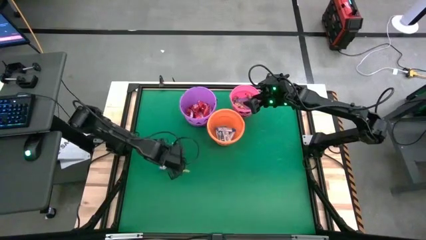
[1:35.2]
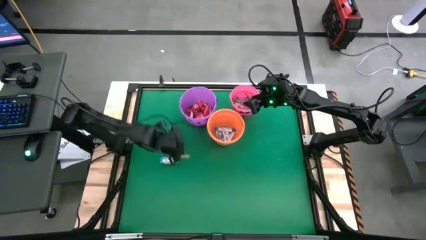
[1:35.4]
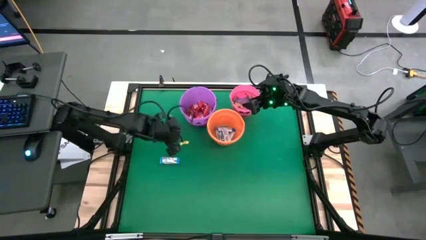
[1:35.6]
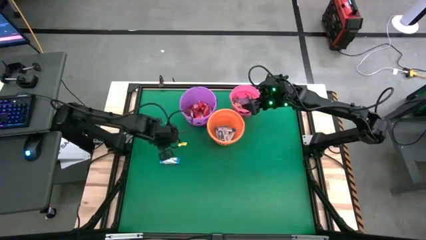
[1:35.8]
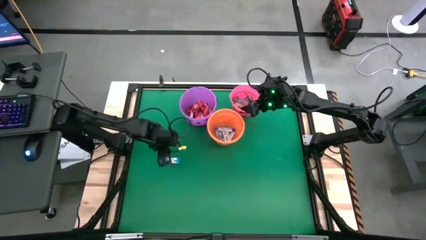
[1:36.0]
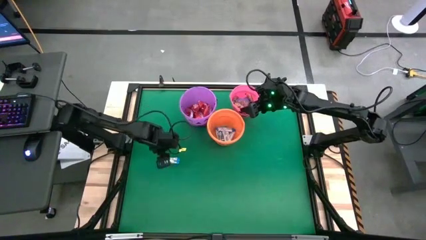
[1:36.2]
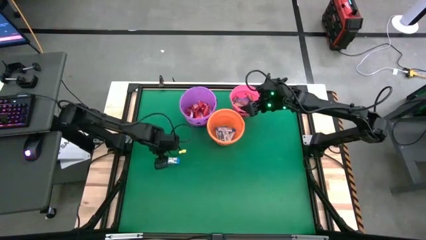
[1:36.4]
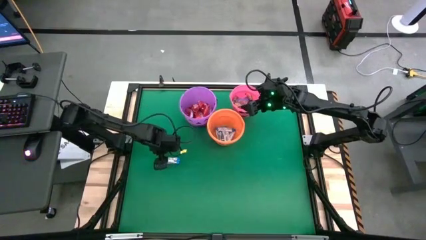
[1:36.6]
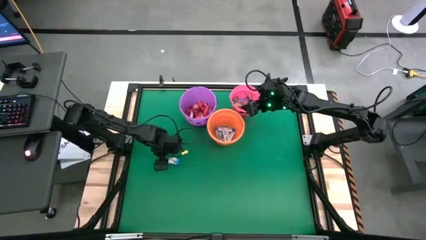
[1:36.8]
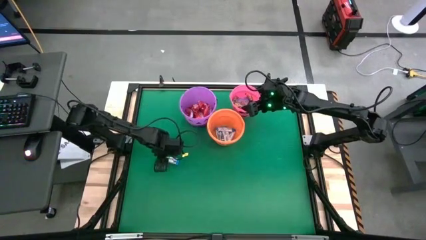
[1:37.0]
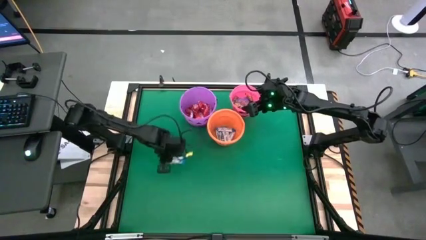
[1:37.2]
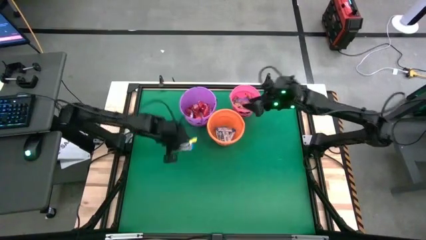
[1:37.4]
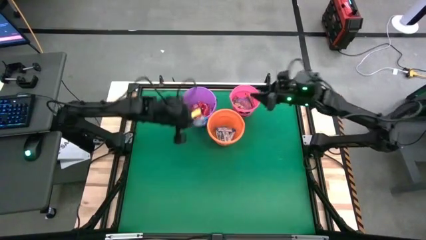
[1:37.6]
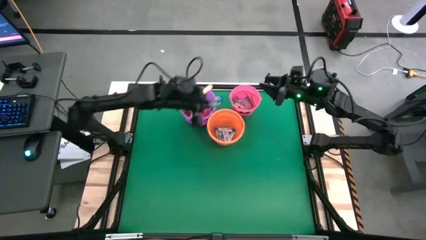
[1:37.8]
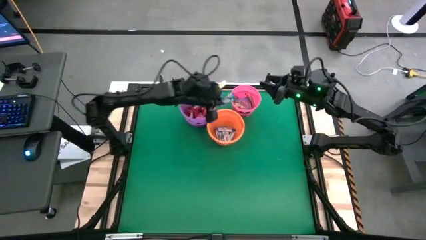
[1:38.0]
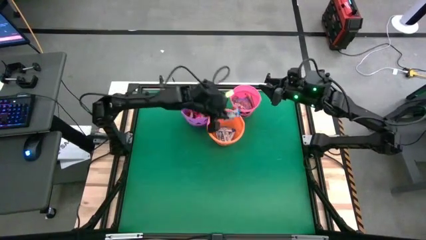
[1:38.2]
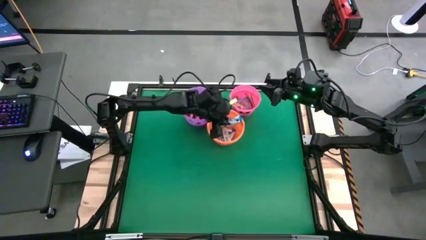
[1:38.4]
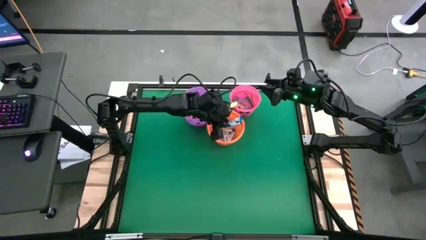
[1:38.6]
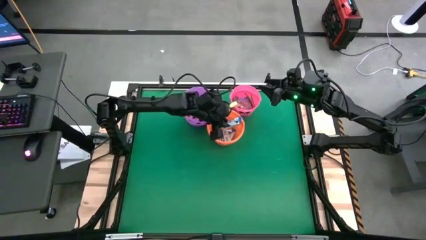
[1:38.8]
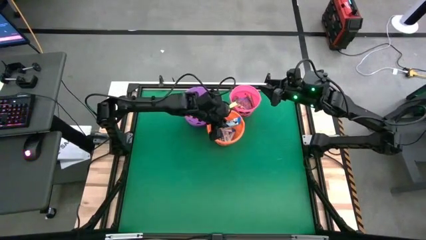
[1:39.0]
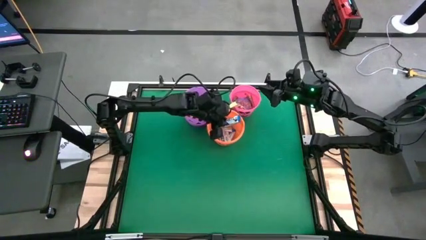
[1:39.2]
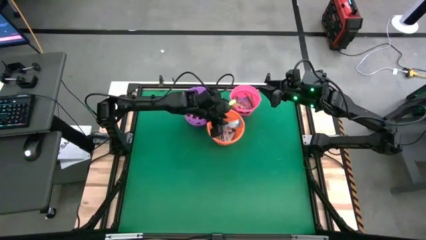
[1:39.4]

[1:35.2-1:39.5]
Task: Sort candy by brand, put in halloween buckets
Put the white chocolate into the orange bucket

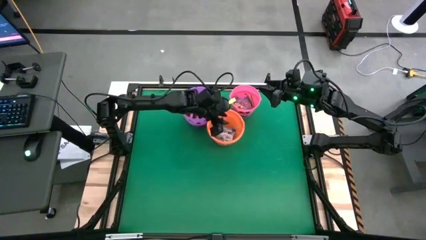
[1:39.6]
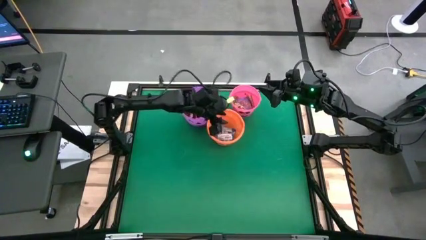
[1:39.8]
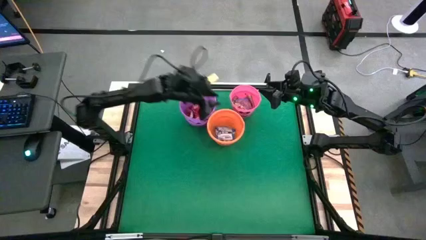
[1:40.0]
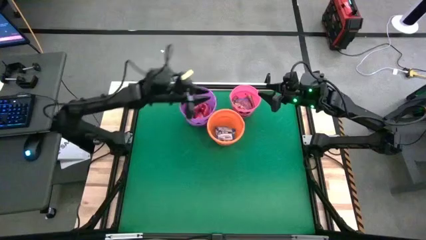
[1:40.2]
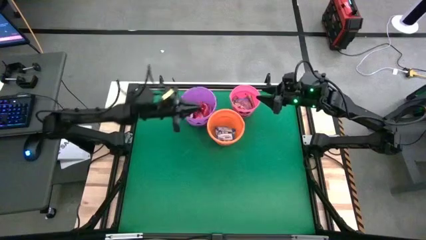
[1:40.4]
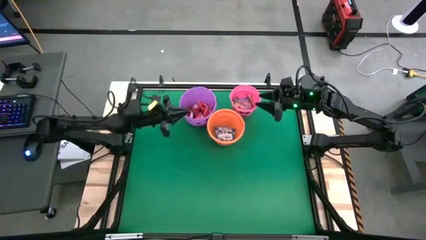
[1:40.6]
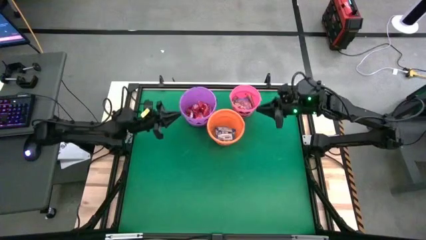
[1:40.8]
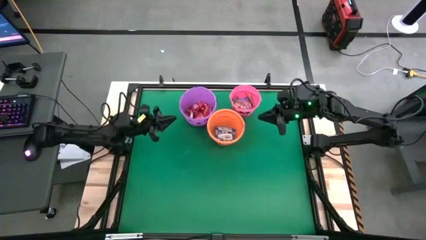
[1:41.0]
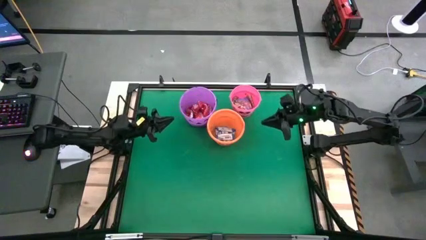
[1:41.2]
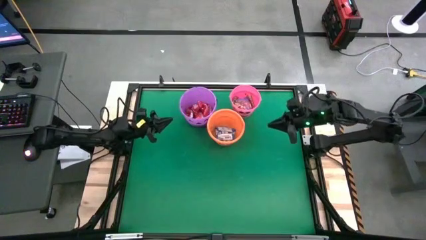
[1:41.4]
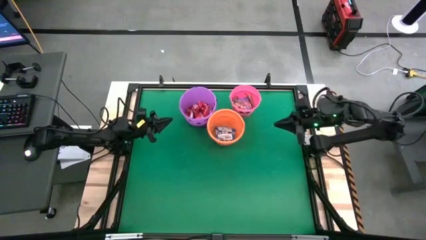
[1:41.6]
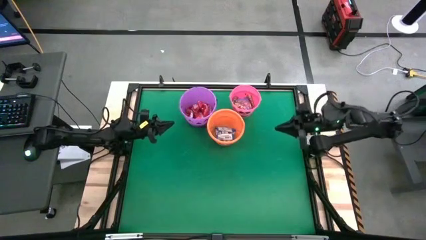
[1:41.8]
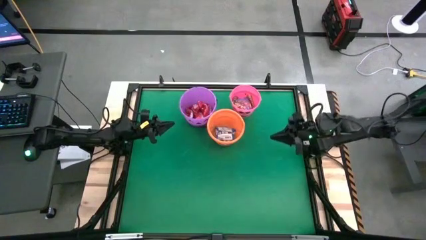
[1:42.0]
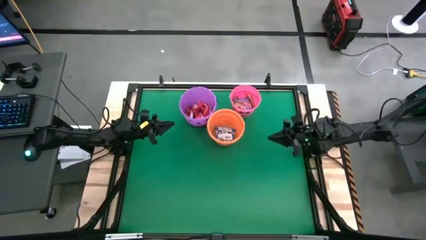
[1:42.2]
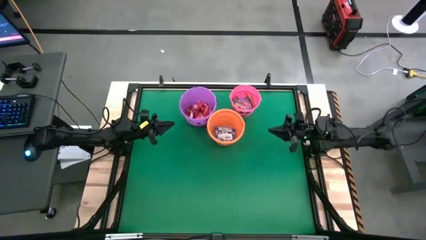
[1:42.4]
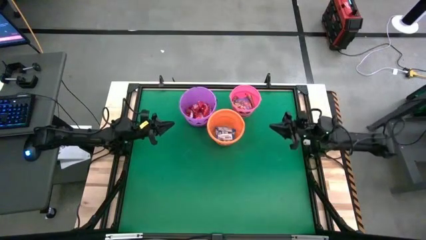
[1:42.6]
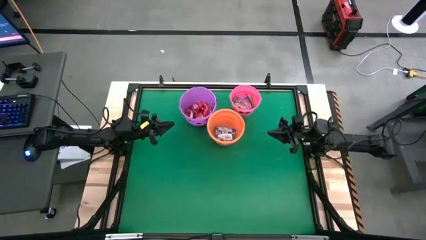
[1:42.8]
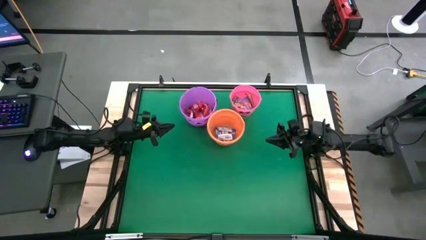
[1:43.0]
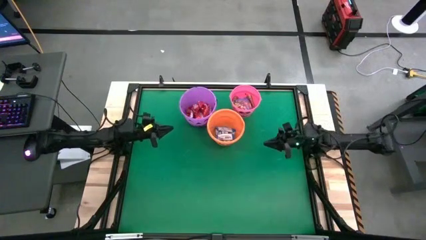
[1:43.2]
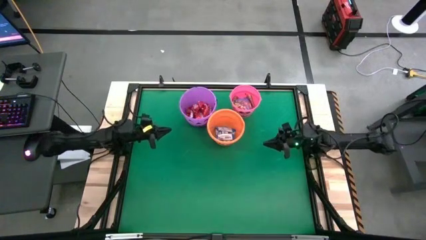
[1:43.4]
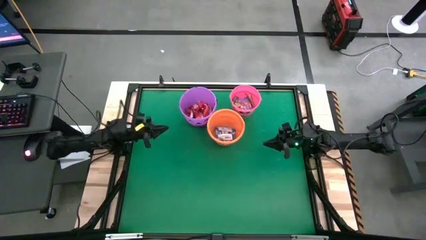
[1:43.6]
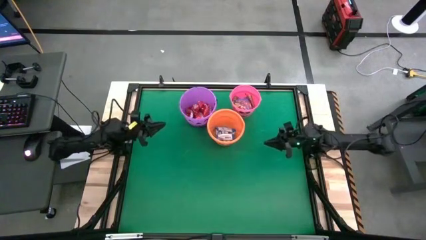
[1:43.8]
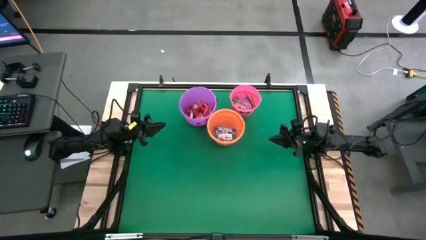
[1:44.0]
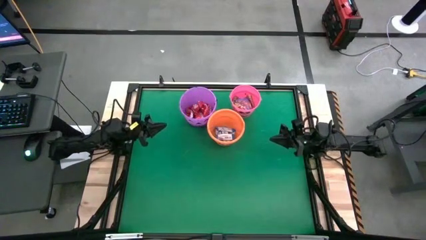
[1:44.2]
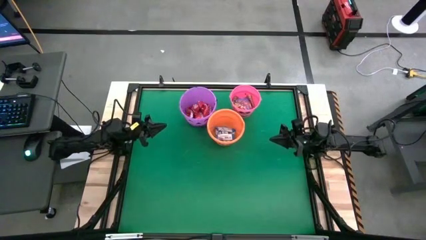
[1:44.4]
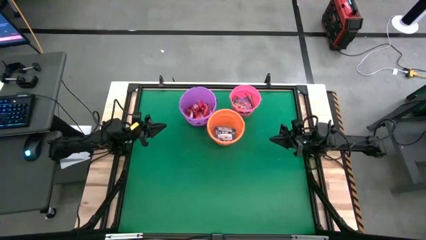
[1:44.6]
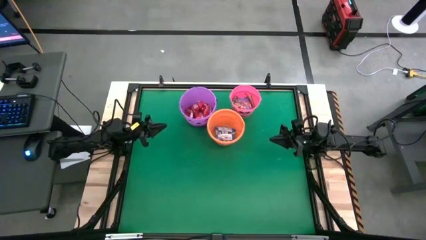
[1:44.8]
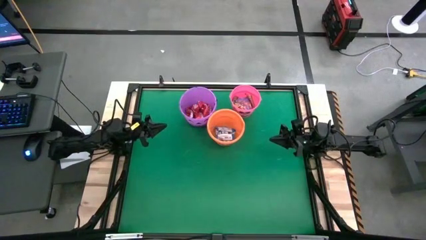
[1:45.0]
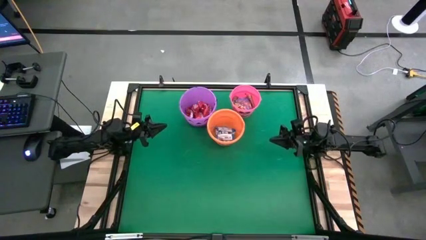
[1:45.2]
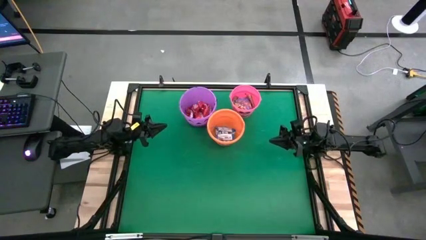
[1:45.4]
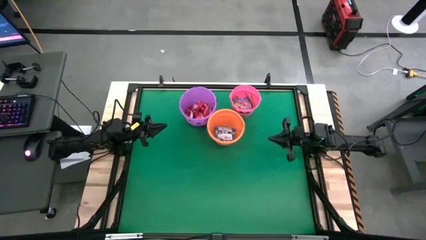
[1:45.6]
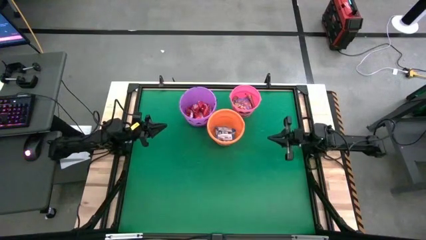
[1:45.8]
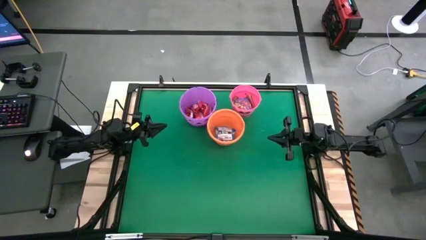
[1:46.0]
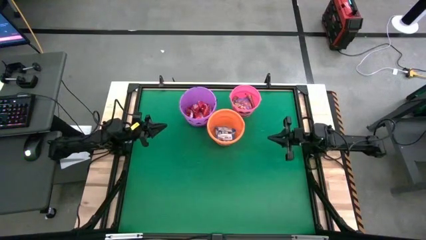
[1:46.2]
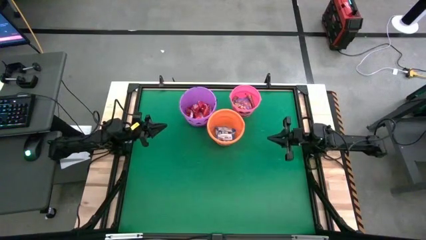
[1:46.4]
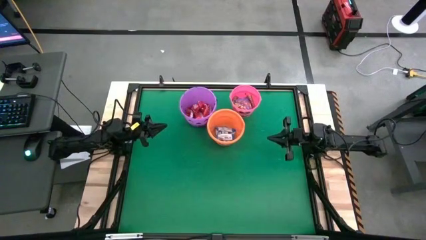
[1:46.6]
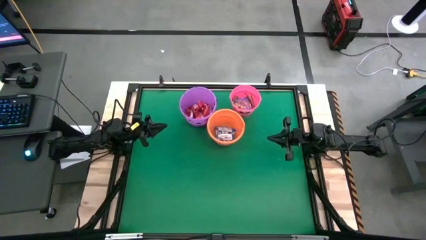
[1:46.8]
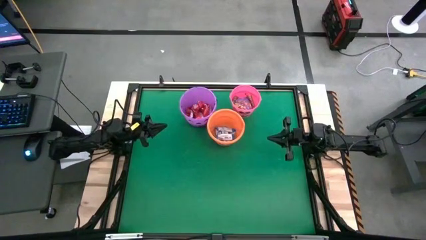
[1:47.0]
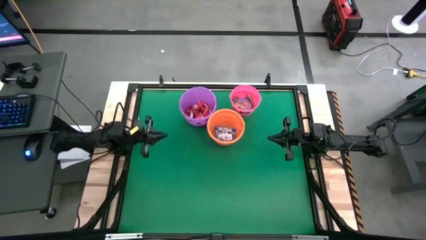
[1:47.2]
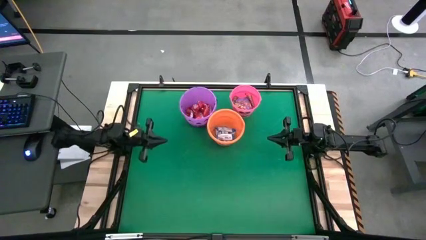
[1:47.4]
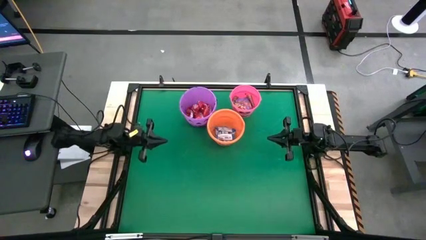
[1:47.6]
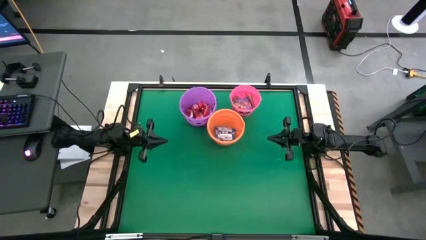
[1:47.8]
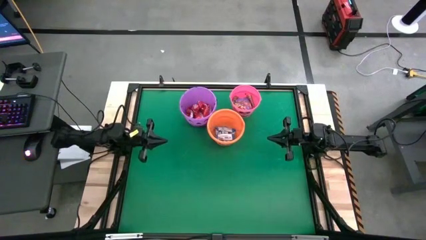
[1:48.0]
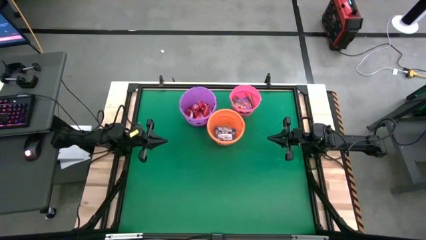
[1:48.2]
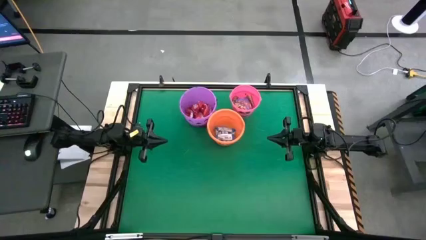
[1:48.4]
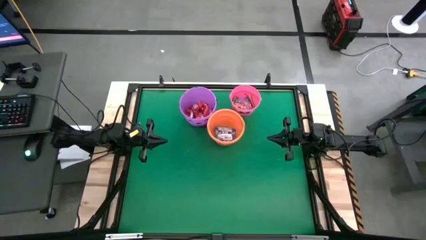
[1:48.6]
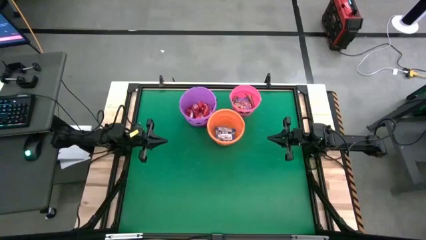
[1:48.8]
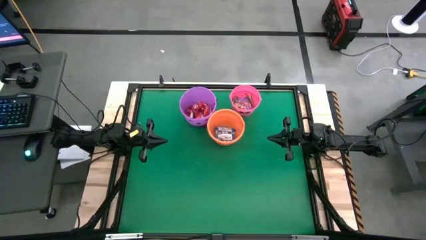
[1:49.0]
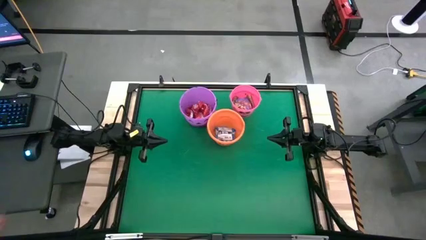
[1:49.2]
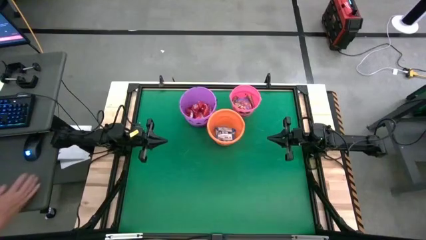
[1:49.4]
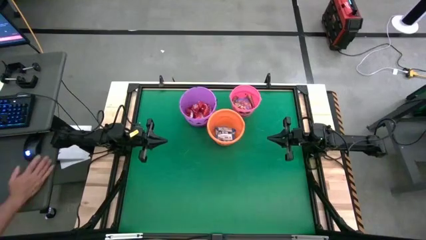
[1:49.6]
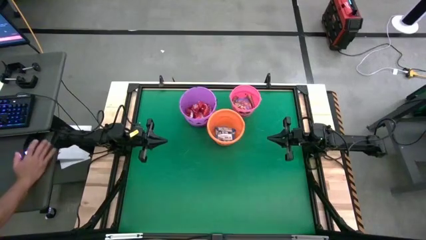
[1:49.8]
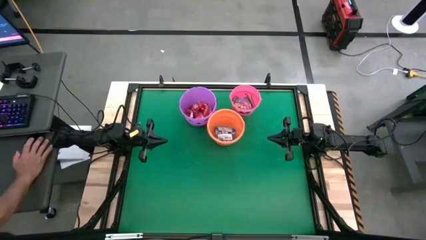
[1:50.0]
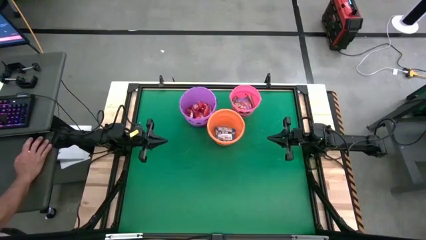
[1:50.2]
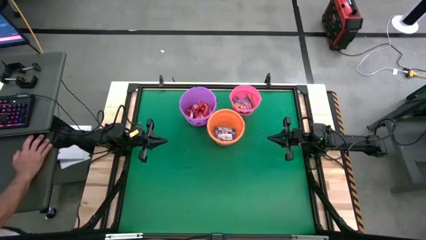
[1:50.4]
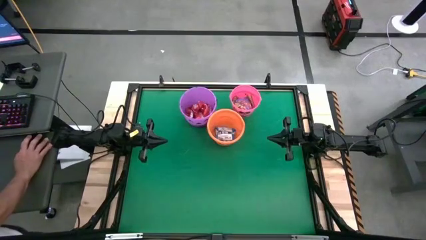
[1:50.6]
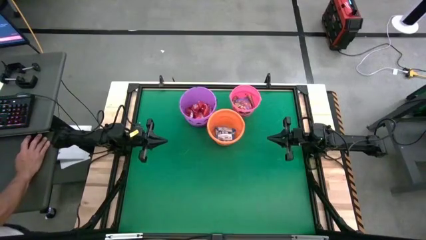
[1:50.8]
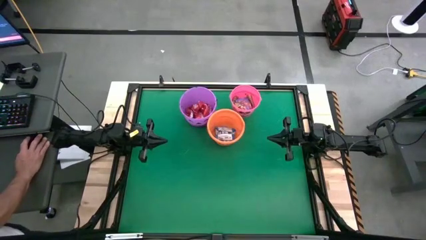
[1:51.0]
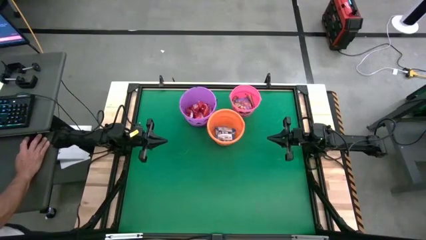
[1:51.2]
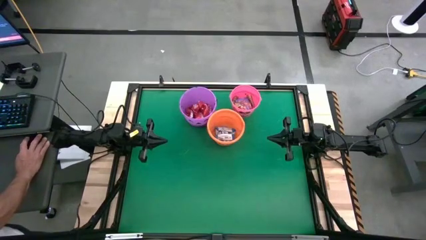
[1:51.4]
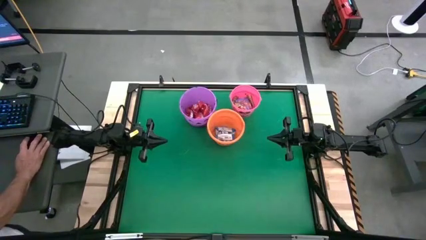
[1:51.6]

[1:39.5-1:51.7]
Return to Home Position
